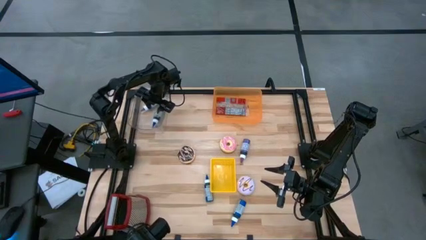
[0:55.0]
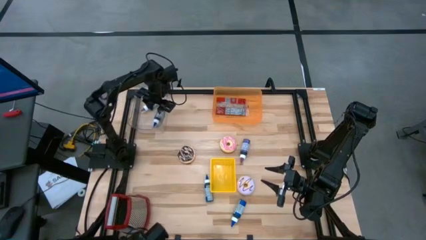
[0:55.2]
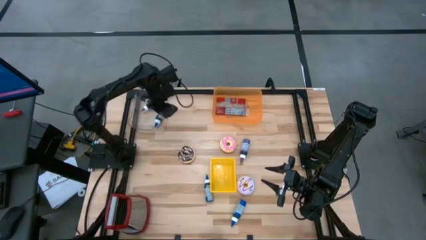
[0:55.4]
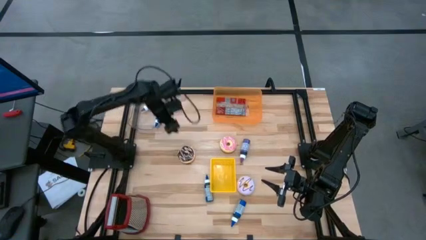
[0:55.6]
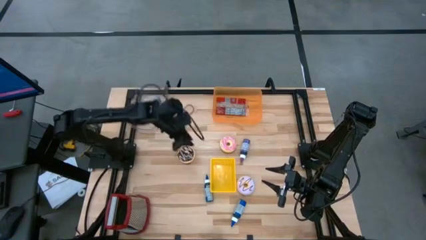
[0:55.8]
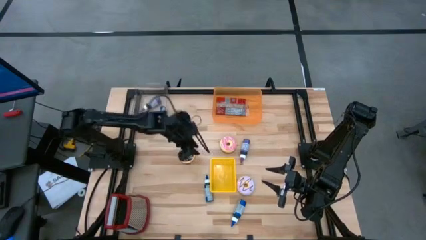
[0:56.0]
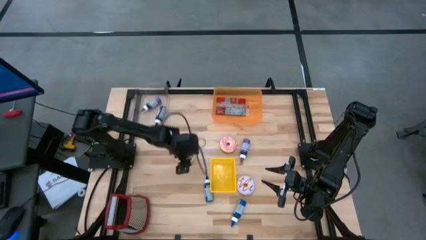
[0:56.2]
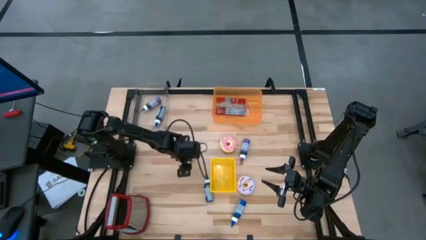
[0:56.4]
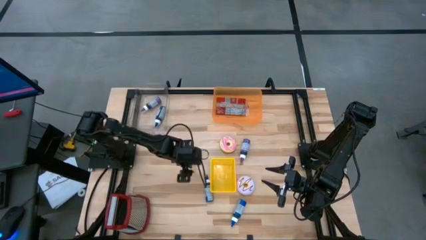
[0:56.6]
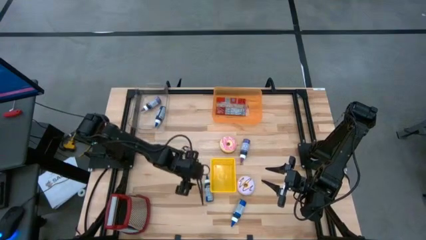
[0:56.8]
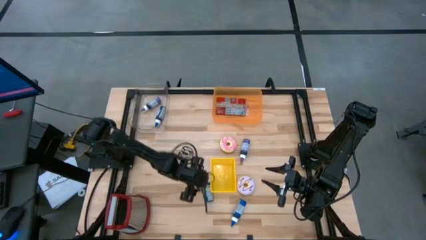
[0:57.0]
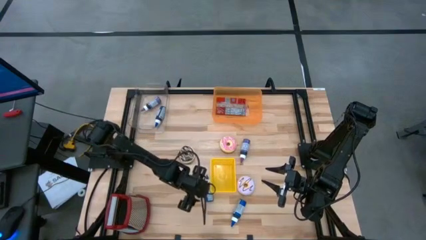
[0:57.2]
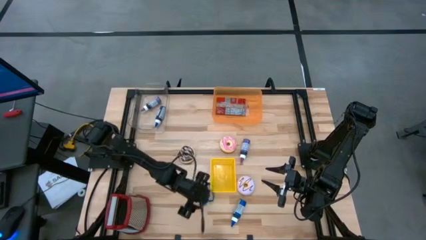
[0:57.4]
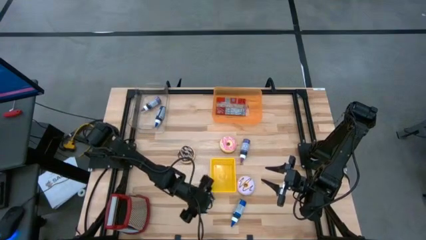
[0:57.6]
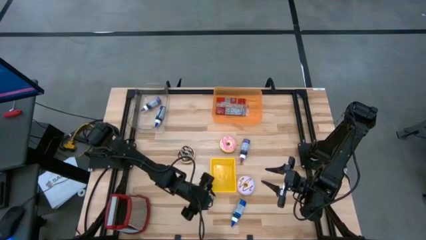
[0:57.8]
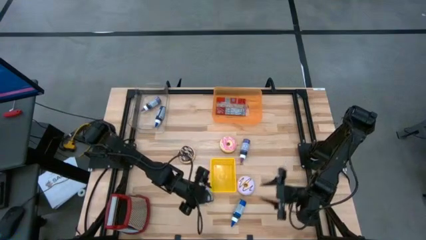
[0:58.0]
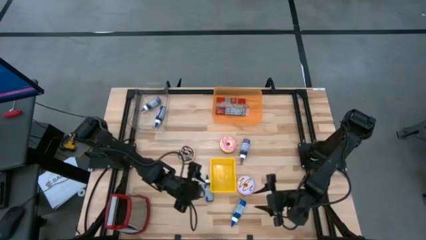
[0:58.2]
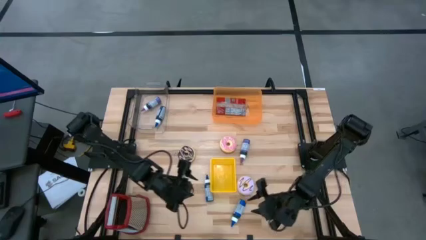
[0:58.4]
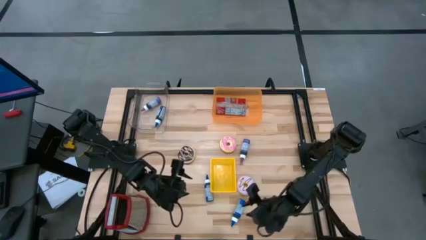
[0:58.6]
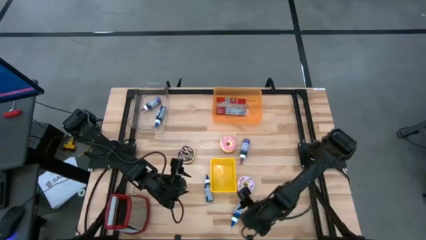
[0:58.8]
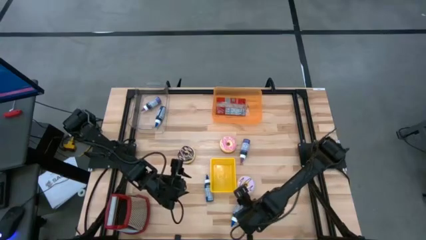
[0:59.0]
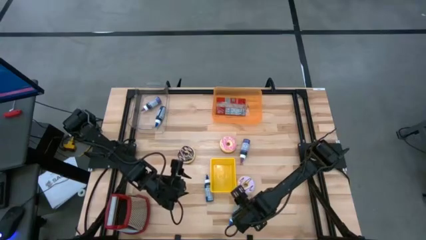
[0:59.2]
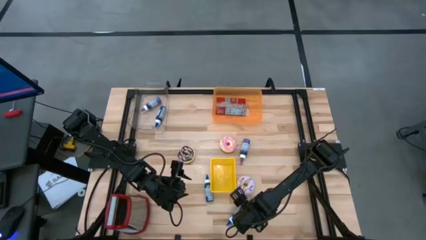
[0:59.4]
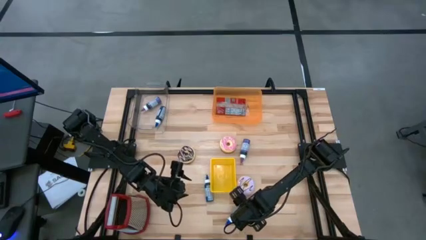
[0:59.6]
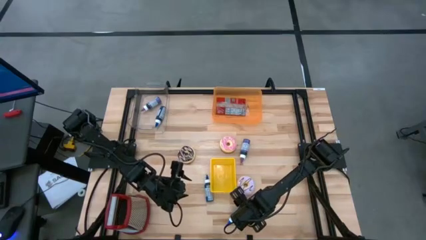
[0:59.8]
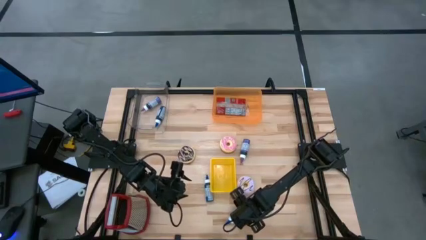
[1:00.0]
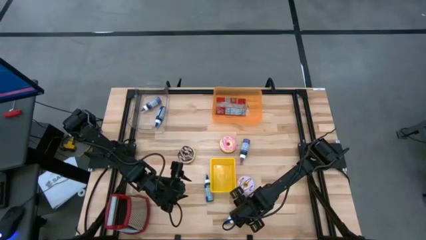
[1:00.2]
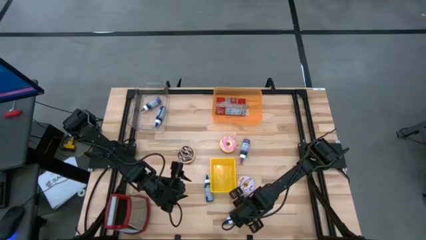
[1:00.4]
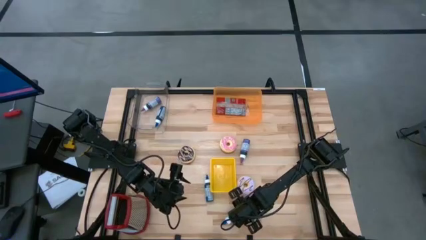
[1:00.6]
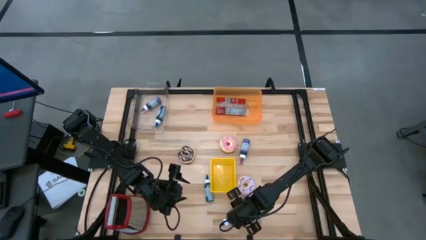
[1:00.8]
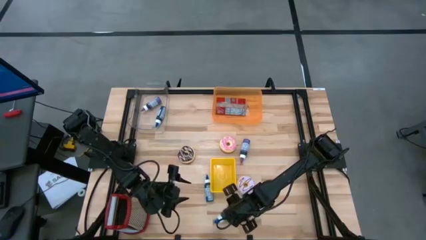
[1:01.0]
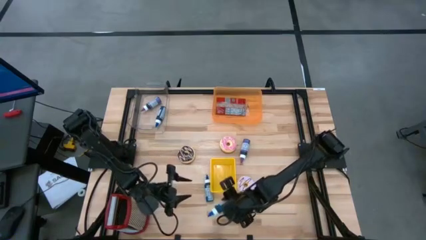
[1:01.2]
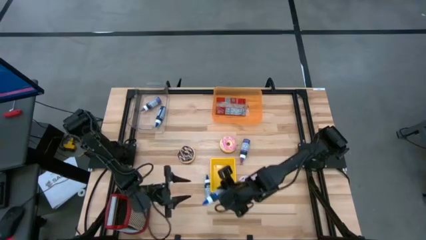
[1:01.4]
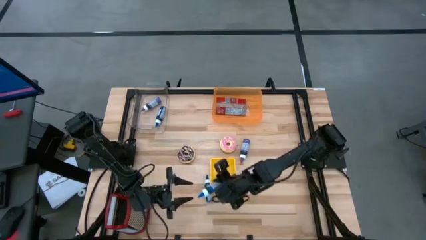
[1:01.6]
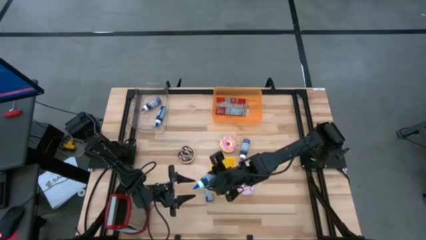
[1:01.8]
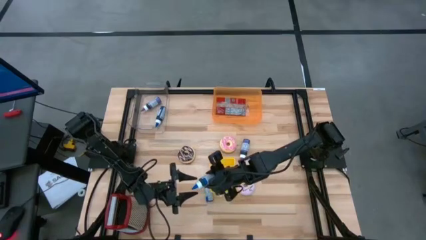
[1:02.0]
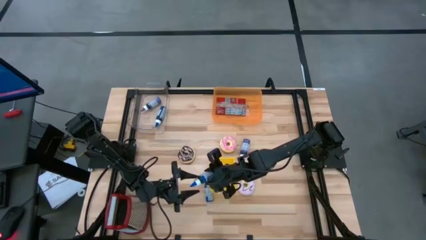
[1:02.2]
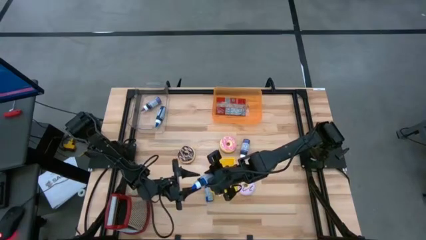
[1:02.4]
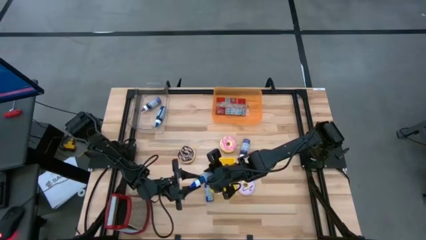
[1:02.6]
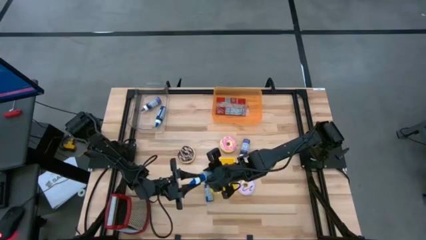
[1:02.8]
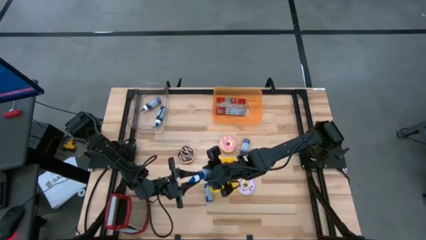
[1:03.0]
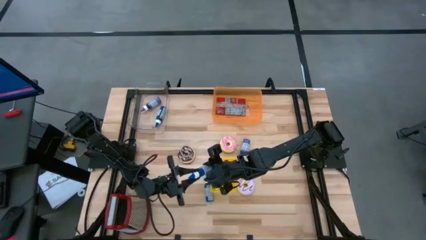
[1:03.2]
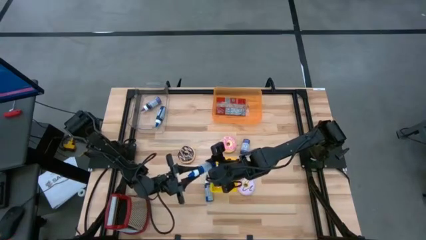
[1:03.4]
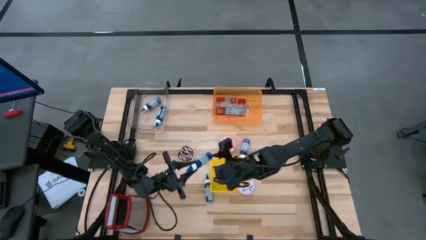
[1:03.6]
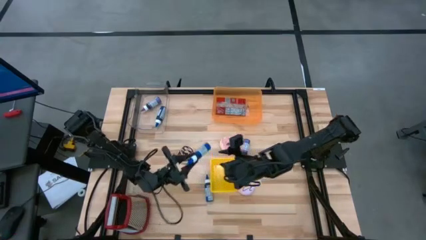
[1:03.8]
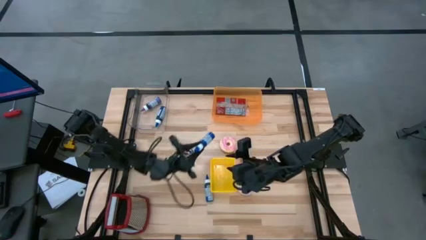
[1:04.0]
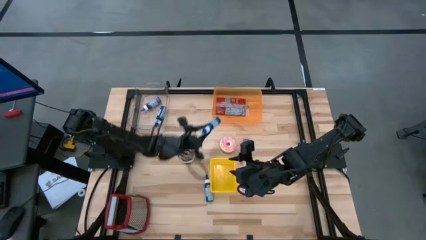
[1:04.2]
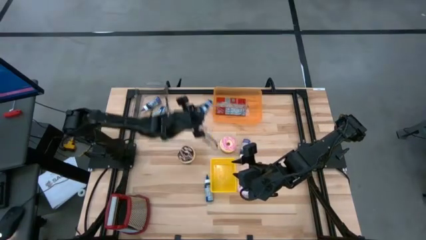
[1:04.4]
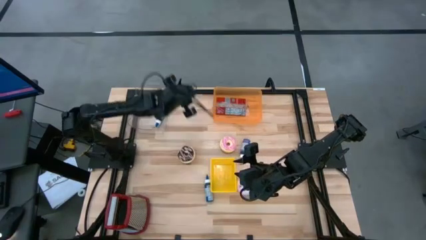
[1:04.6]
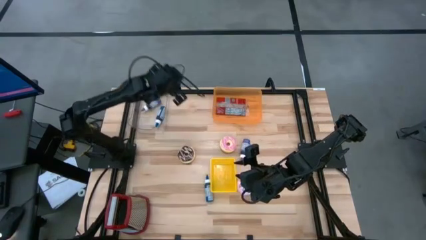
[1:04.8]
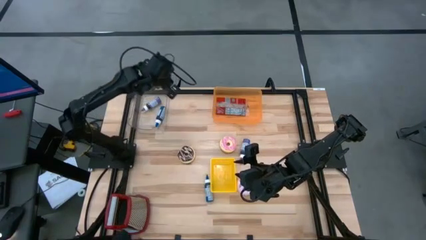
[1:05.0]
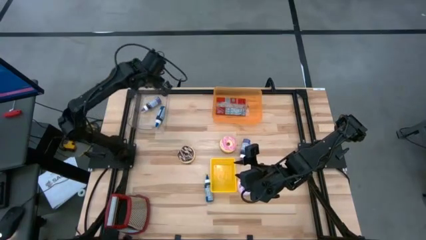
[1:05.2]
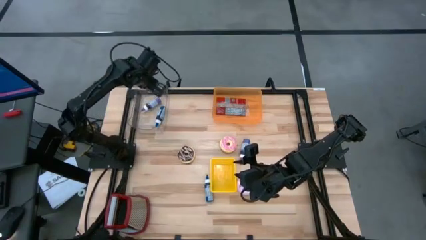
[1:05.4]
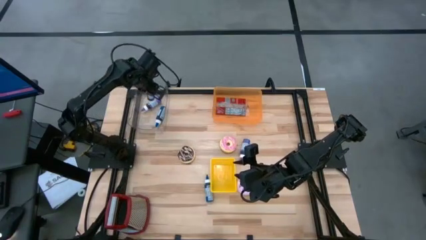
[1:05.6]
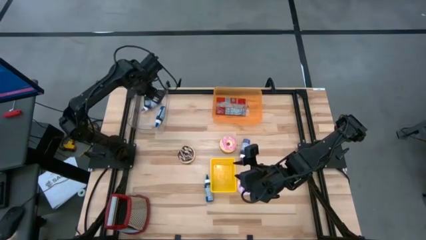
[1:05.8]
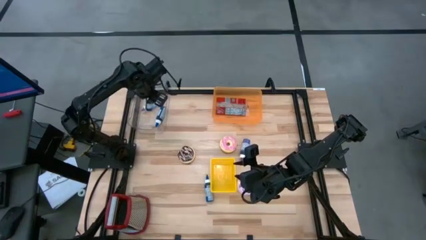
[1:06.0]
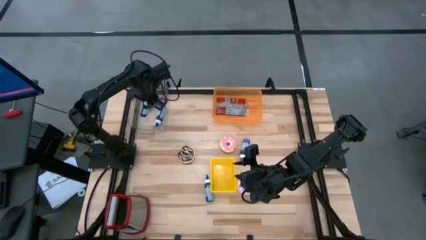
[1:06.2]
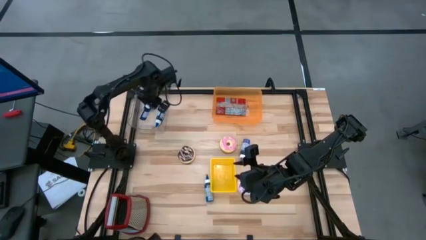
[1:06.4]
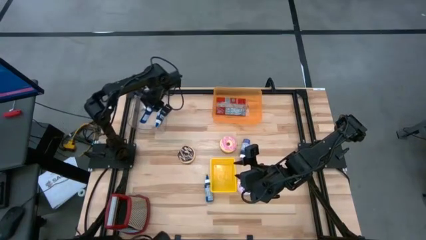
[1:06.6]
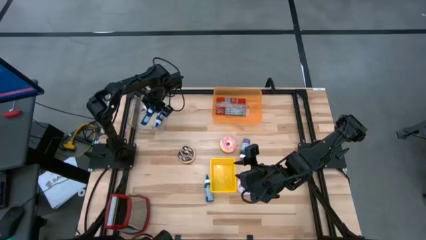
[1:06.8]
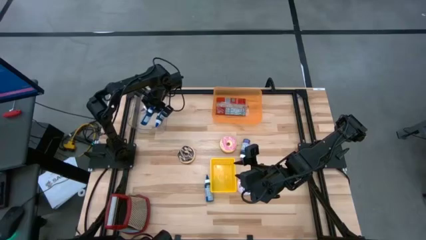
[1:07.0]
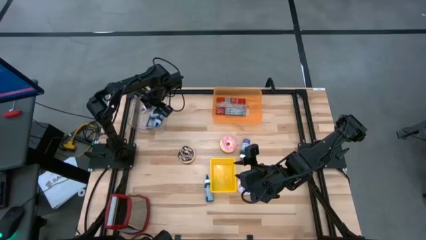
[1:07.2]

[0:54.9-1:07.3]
Put the bottom blue food coloring bottle into the transparent bin
